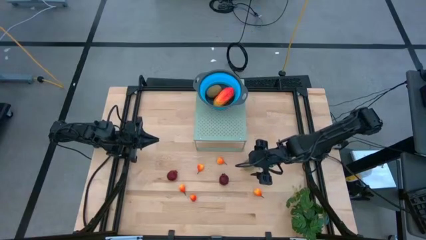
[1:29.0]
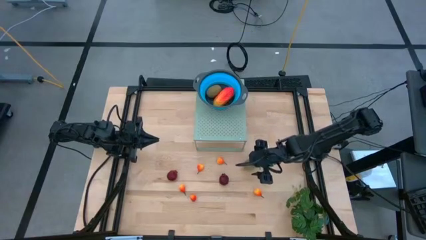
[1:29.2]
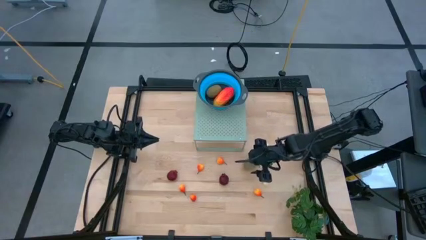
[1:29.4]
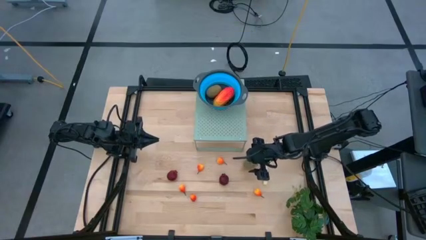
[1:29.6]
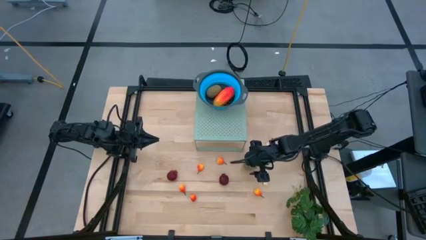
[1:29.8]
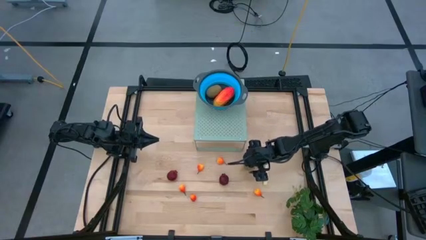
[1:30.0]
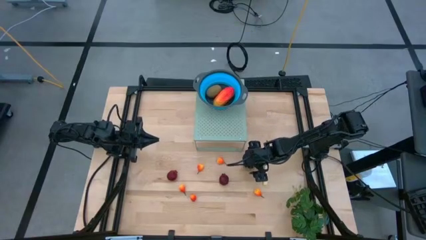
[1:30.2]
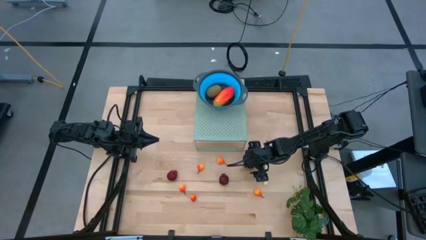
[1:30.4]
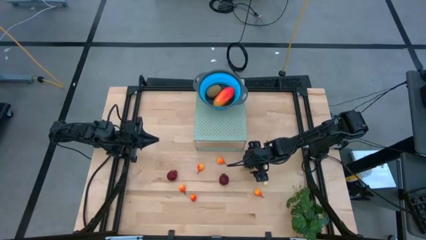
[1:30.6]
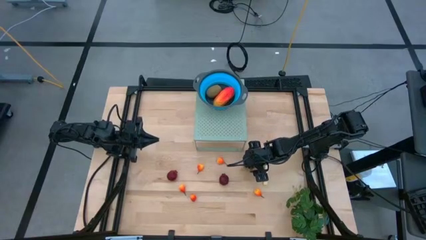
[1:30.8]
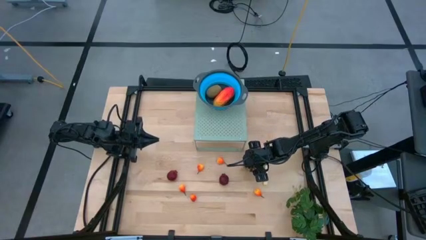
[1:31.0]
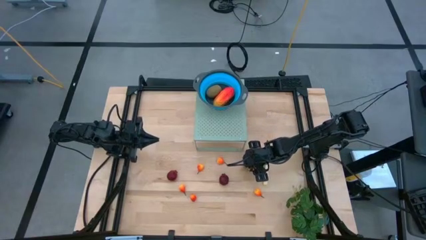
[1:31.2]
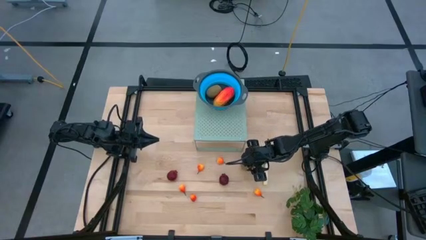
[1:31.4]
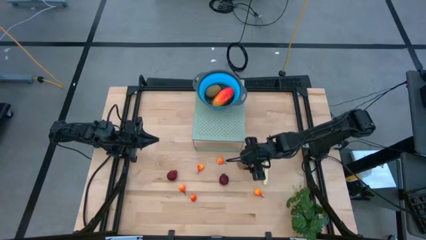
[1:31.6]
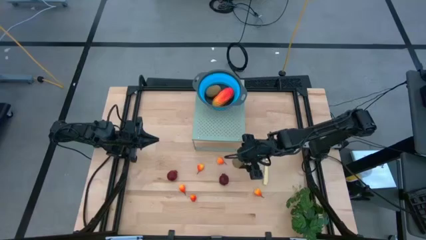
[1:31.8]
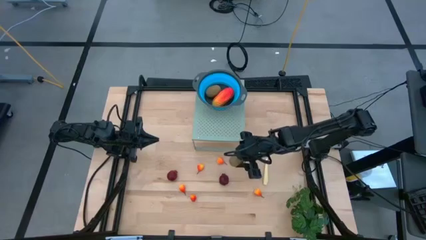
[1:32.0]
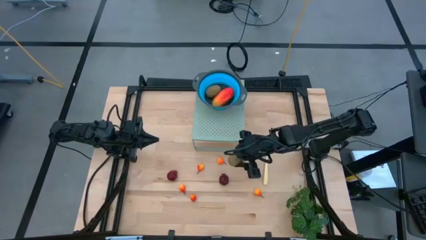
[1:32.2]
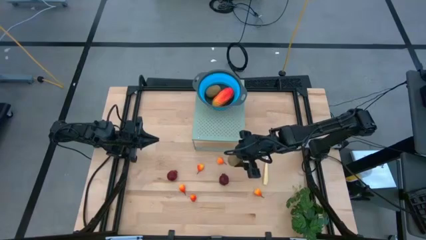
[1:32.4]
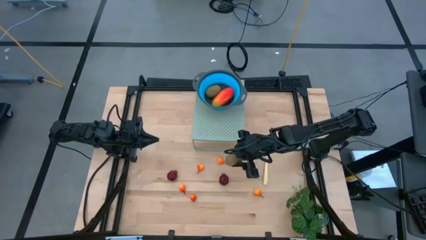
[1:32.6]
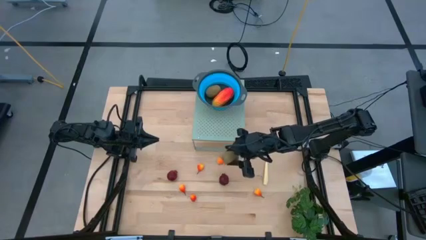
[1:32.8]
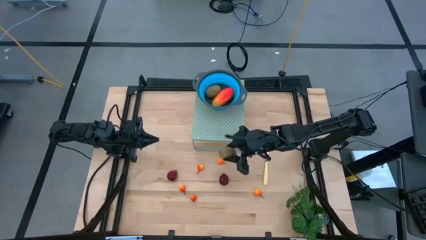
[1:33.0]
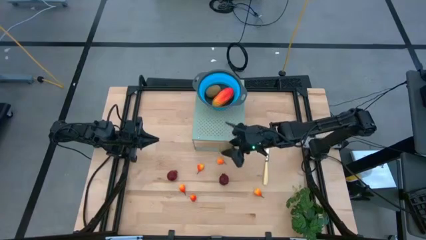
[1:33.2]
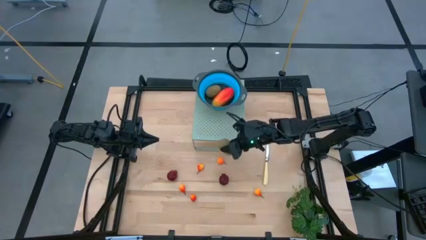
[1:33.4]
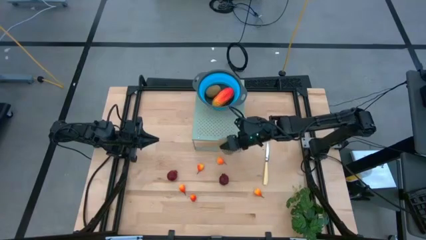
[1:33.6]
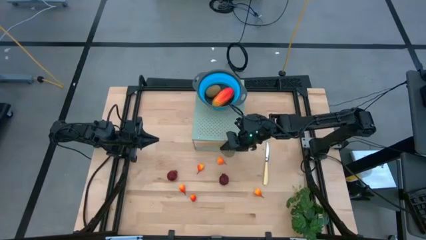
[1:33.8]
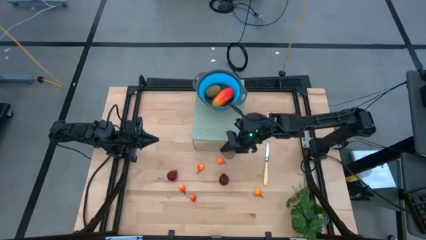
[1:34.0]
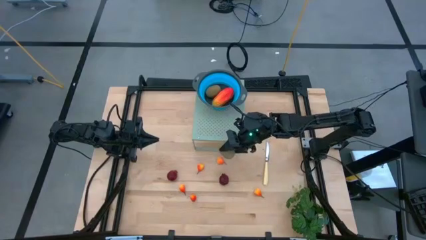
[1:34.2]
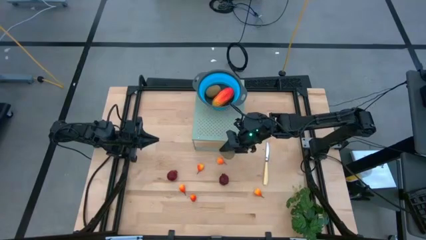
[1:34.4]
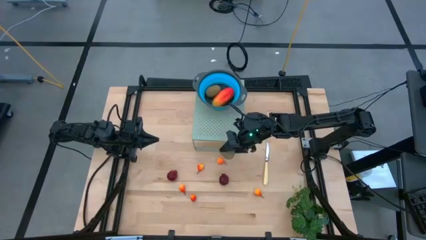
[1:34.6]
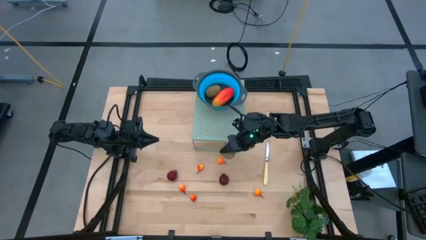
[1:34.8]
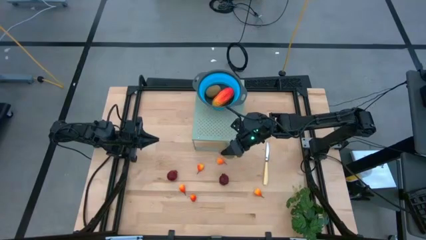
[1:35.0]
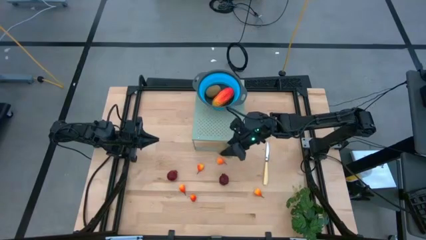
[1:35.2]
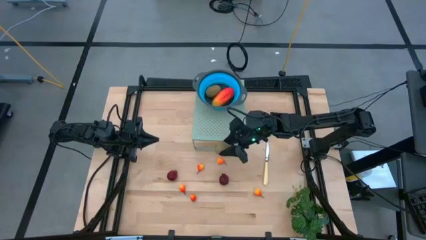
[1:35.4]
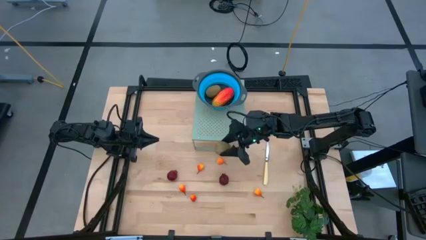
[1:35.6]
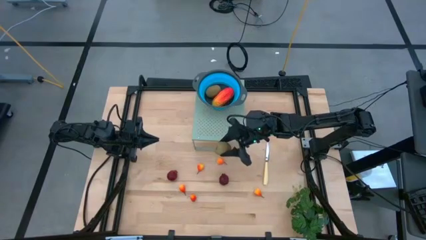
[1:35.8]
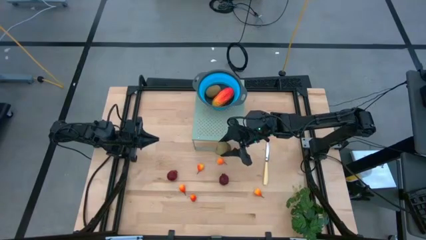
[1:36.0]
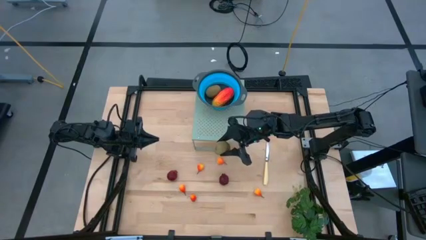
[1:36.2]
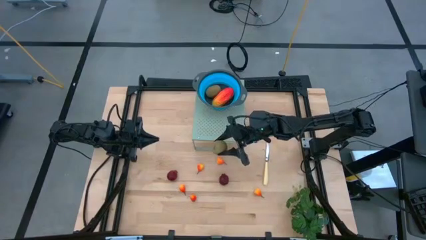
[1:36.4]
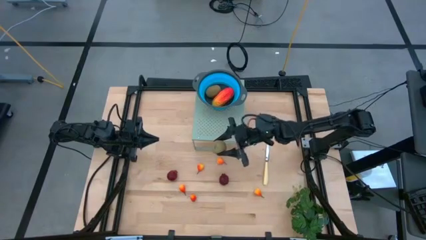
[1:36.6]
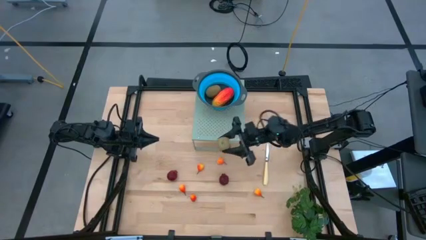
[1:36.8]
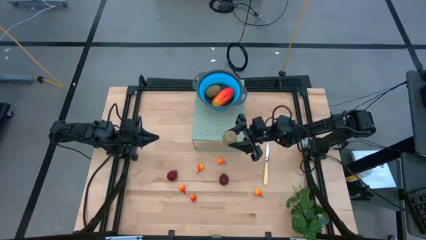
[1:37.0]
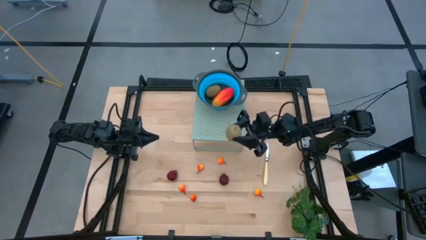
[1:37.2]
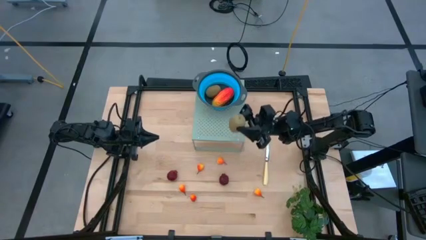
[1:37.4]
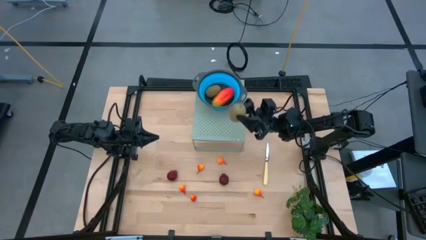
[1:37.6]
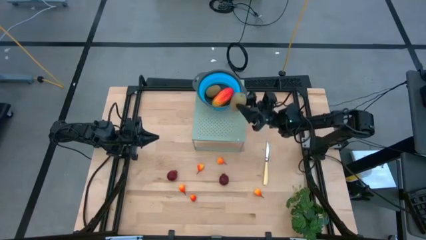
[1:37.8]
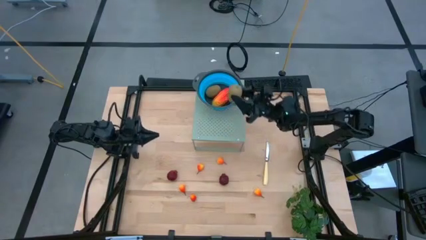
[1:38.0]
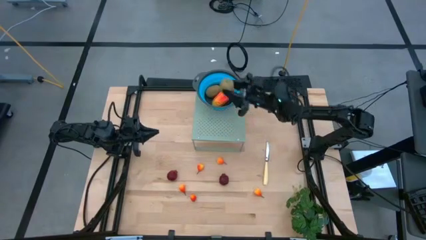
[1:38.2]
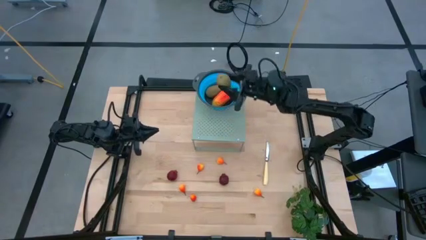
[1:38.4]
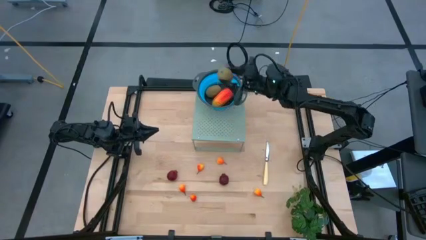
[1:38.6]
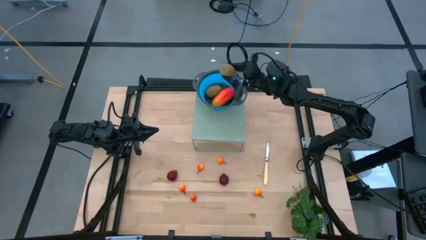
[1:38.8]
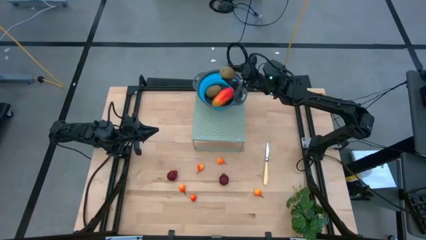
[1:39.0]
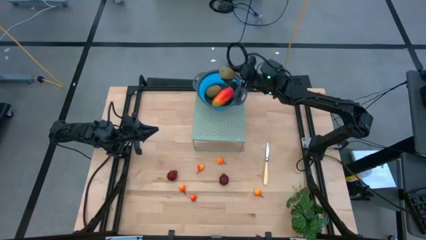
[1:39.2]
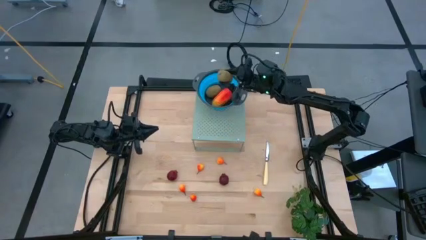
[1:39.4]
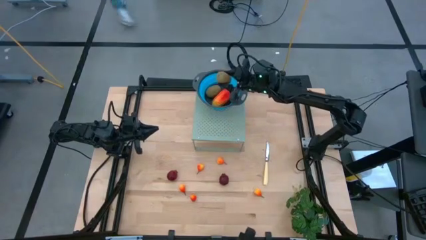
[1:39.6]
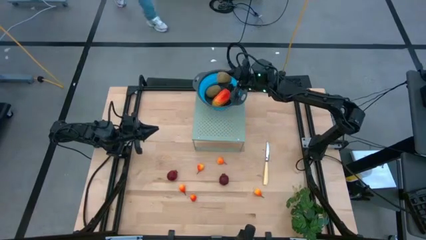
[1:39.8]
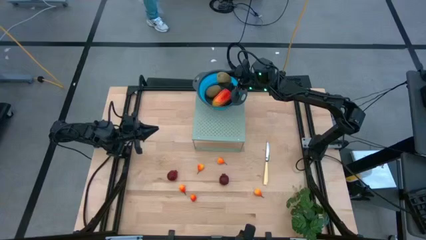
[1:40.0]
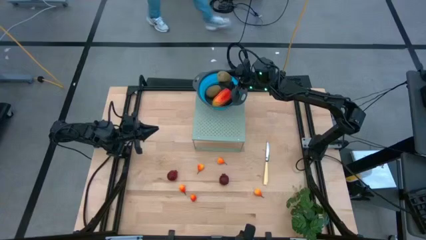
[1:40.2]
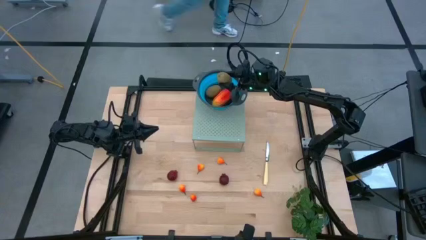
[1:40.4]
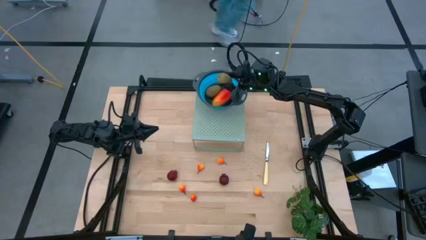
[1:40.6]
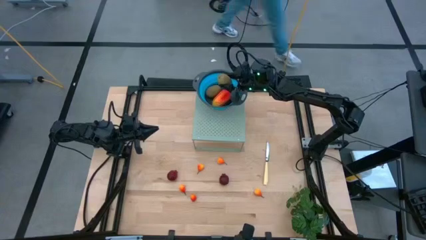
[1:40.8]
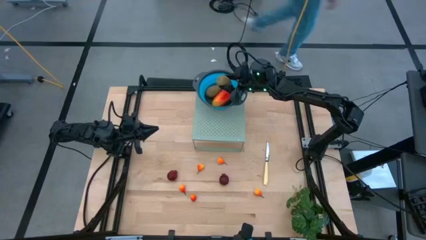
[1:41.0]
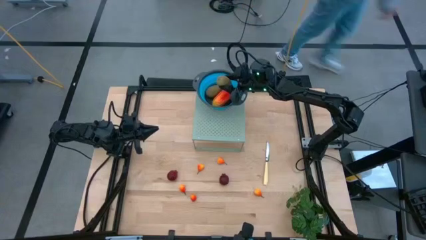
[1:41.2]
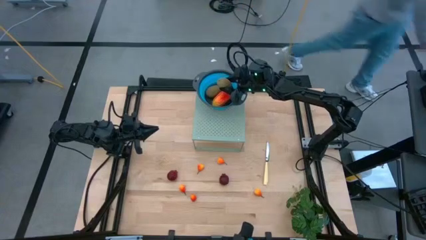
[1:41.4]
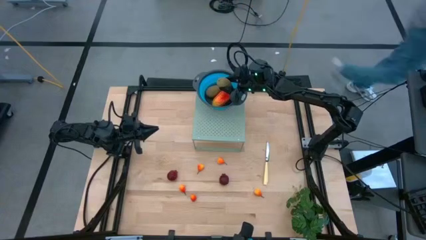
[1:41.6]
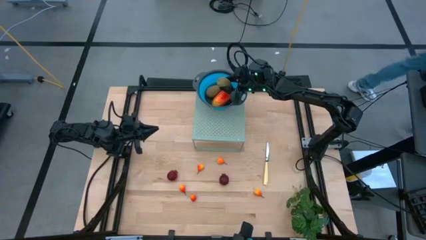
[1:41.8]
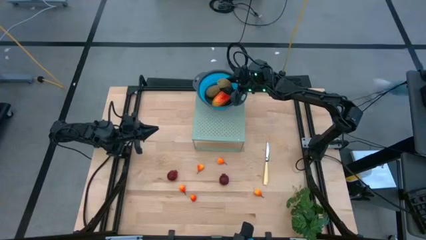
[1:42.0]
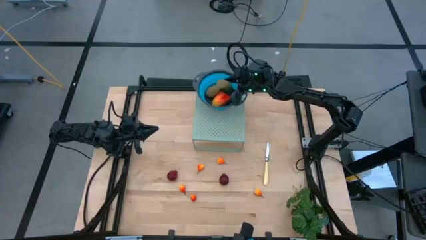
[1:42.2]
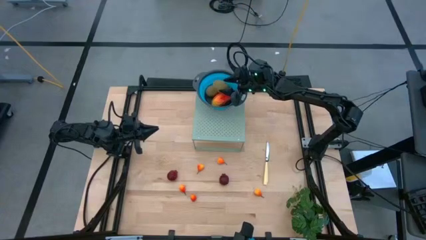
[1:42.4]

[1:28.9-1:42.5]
Task: Pick & Place Fruit
Put the kiwi into the blue strainer bowl on the shelf
